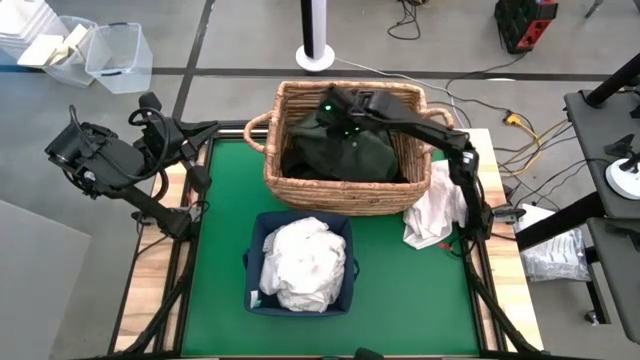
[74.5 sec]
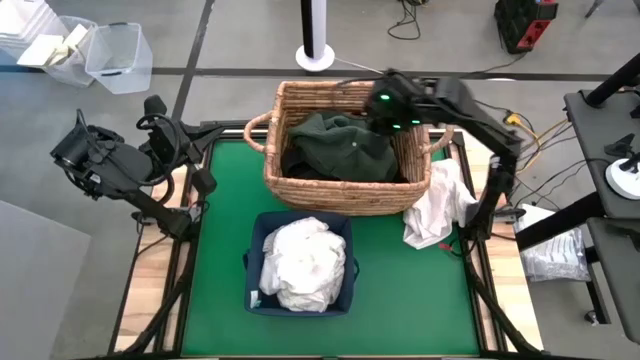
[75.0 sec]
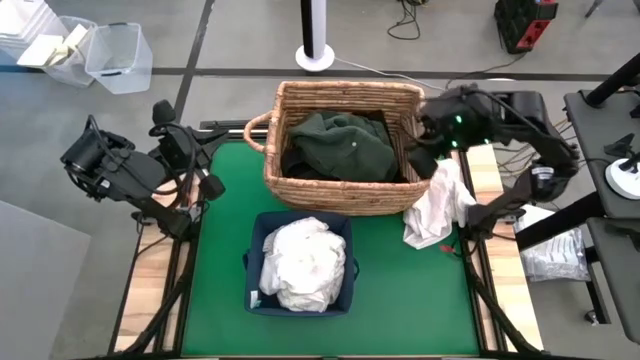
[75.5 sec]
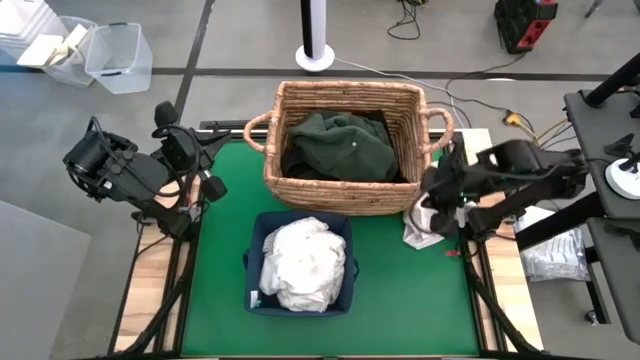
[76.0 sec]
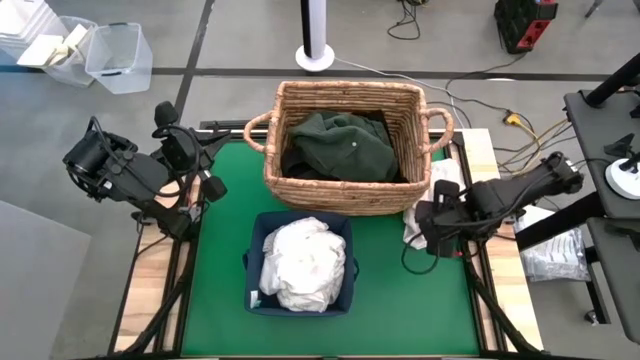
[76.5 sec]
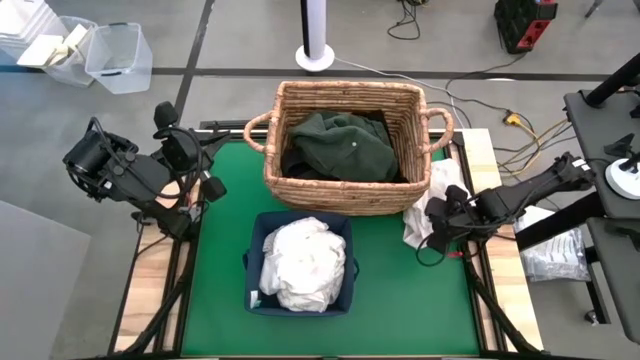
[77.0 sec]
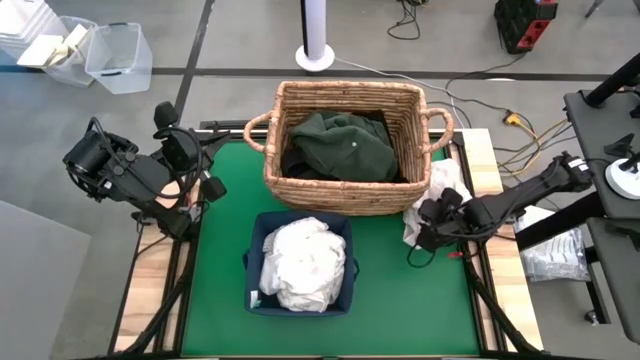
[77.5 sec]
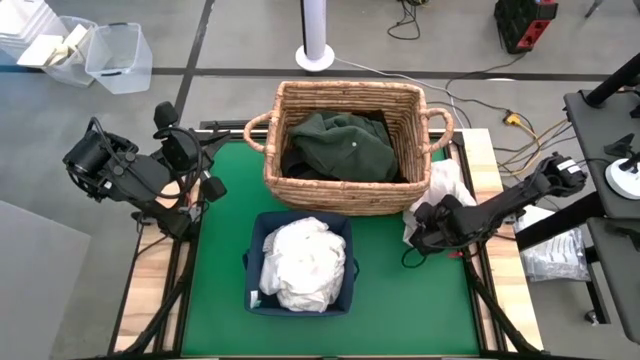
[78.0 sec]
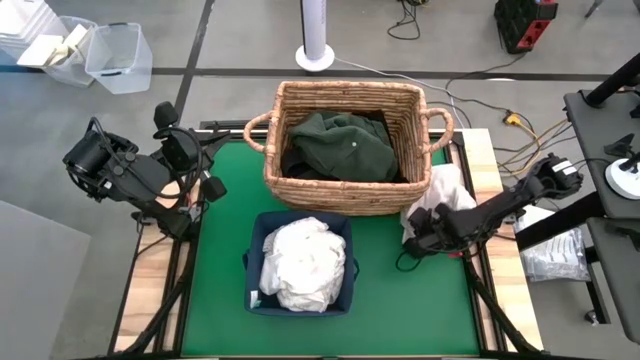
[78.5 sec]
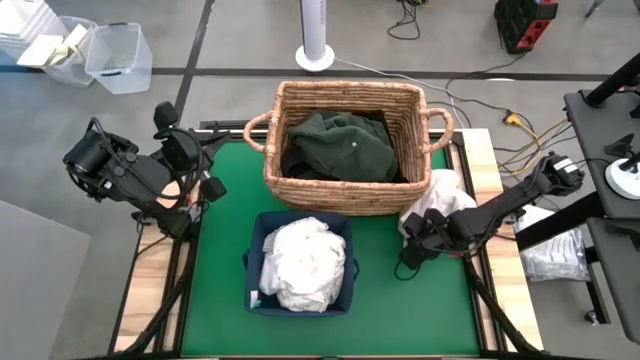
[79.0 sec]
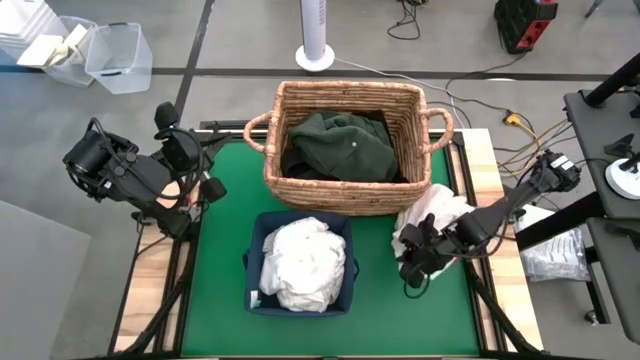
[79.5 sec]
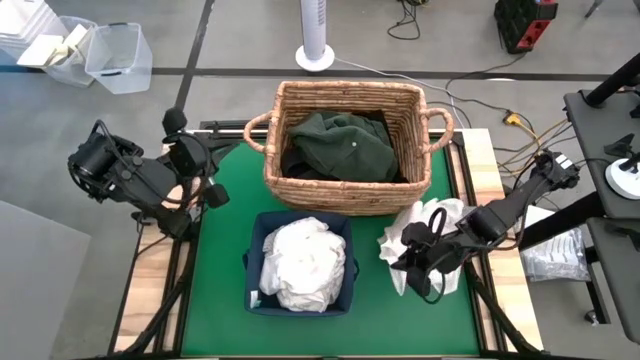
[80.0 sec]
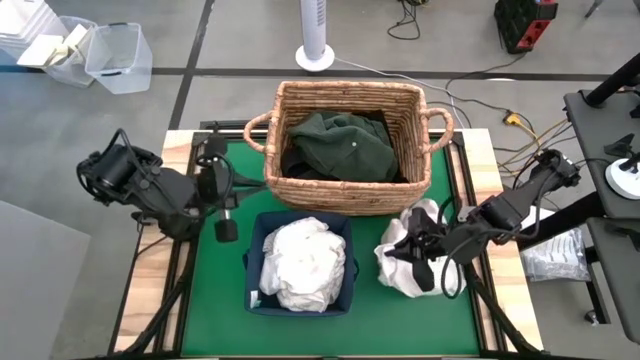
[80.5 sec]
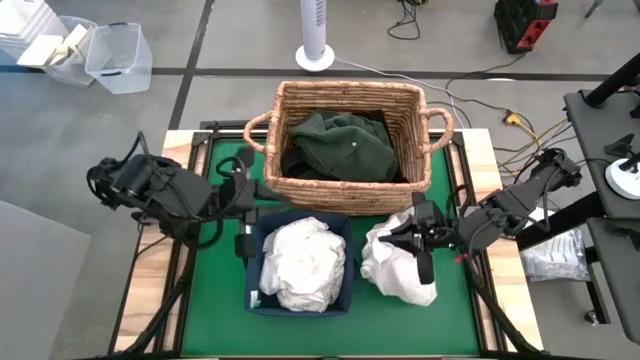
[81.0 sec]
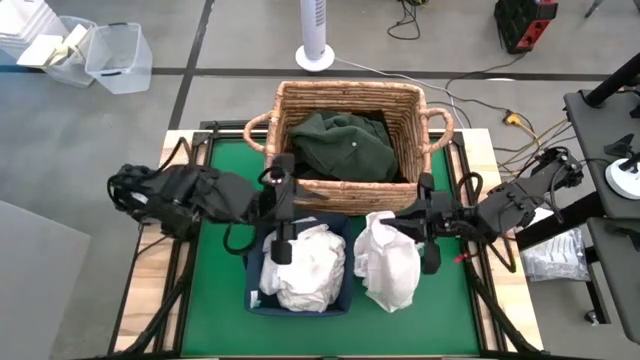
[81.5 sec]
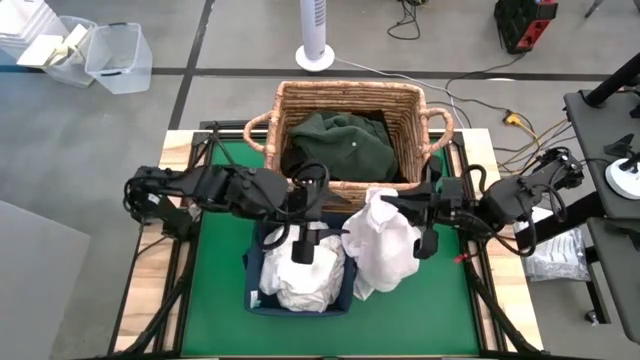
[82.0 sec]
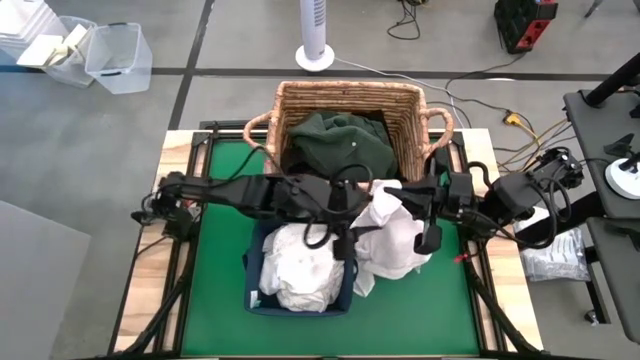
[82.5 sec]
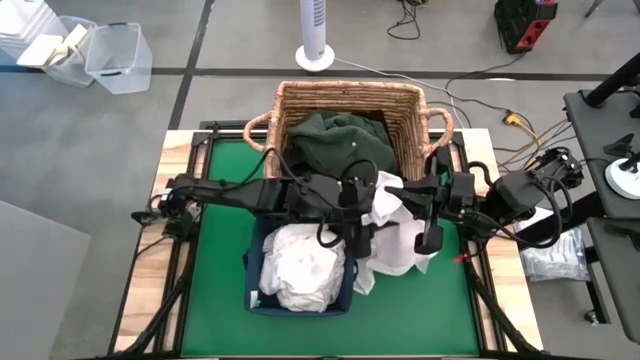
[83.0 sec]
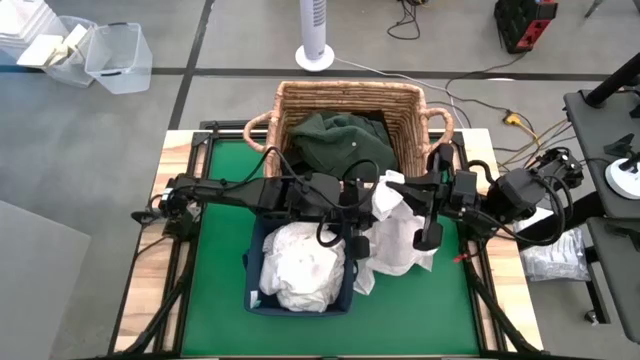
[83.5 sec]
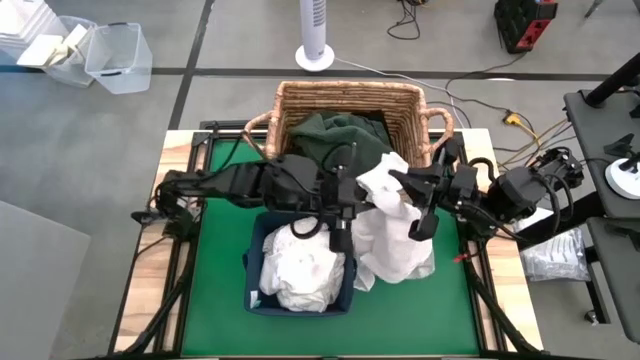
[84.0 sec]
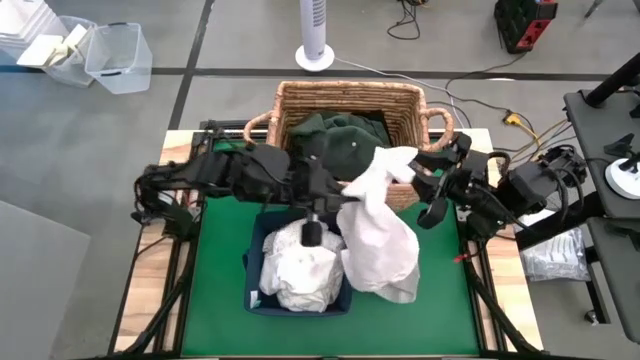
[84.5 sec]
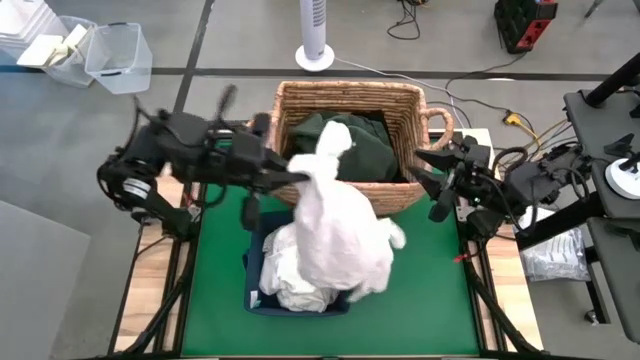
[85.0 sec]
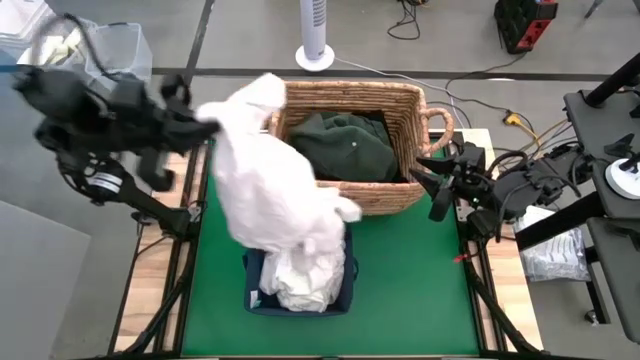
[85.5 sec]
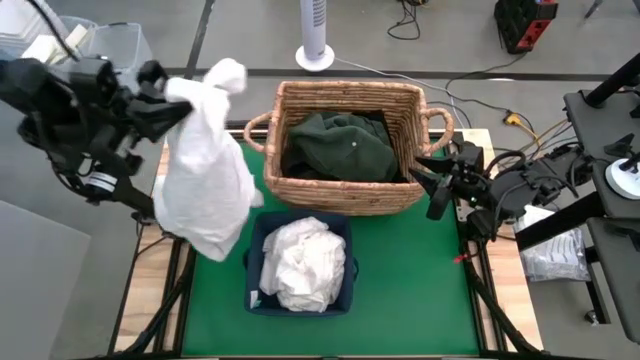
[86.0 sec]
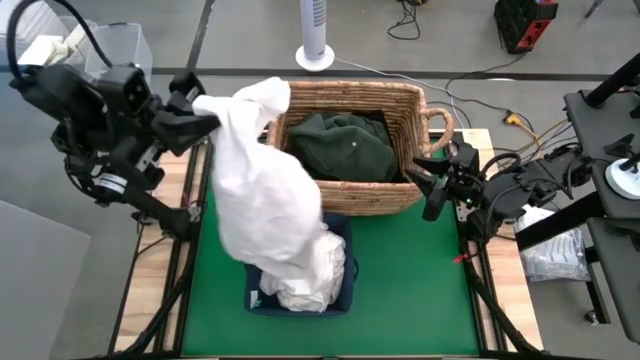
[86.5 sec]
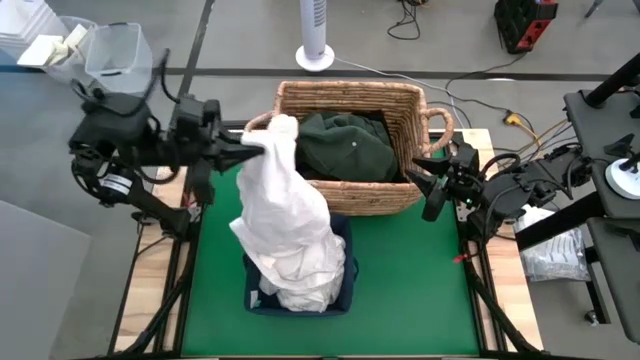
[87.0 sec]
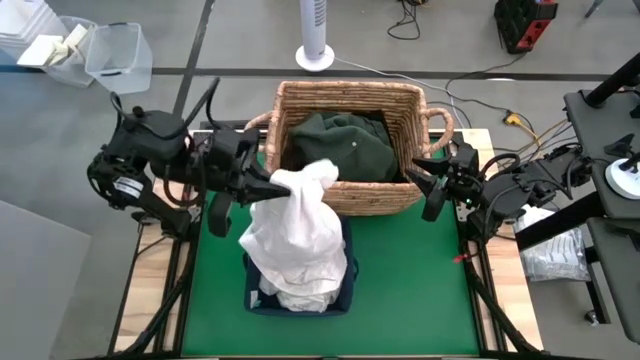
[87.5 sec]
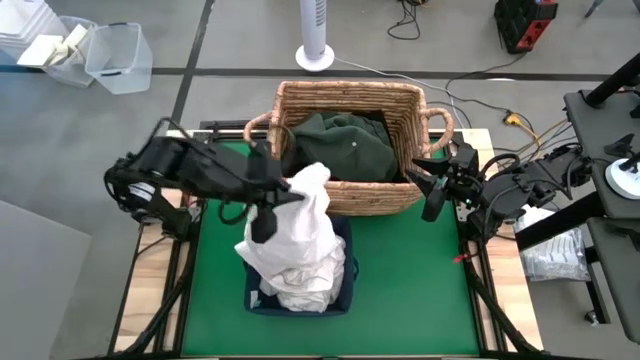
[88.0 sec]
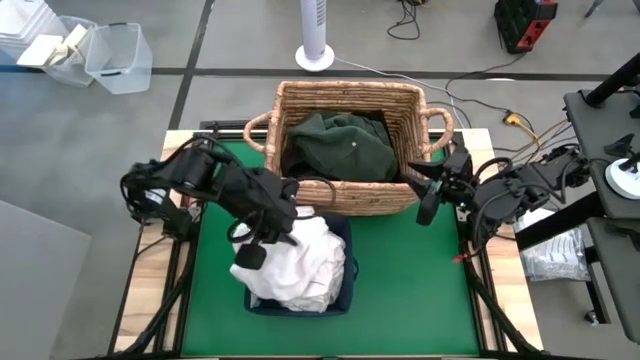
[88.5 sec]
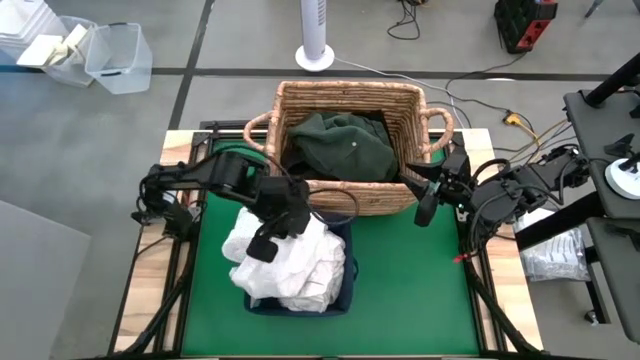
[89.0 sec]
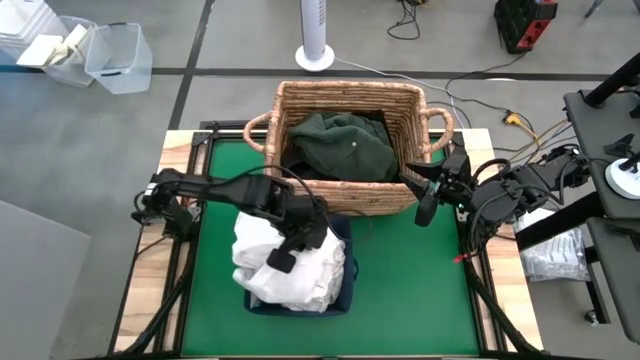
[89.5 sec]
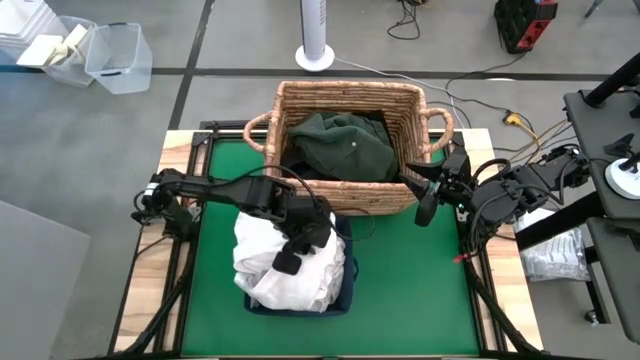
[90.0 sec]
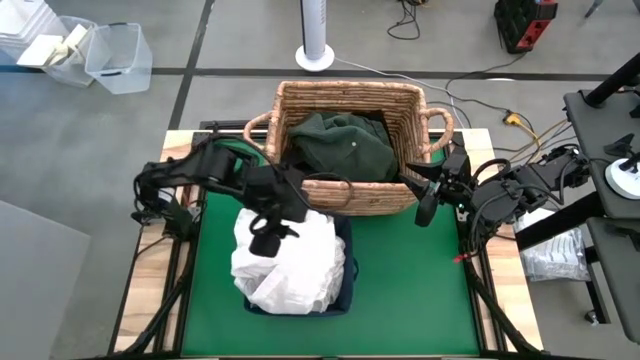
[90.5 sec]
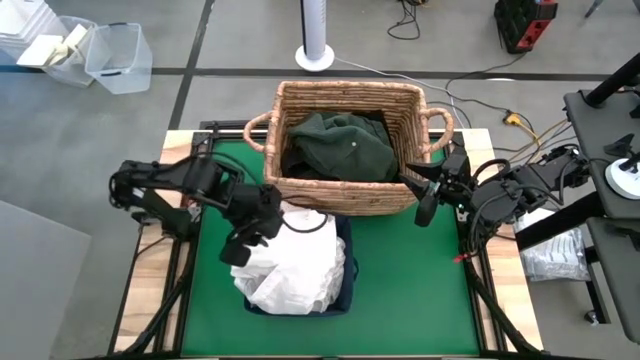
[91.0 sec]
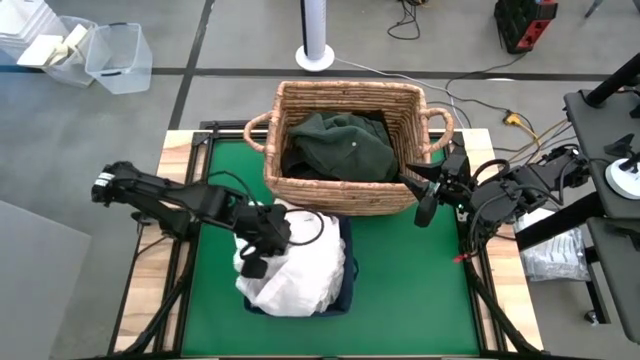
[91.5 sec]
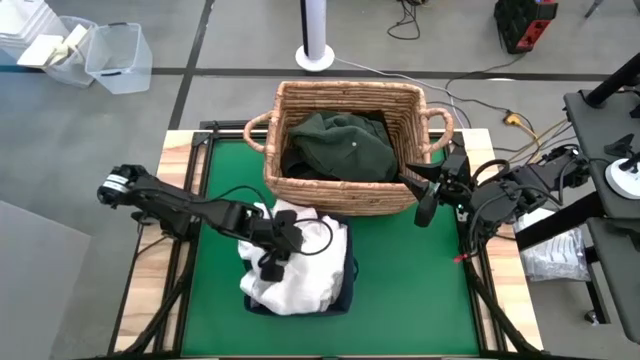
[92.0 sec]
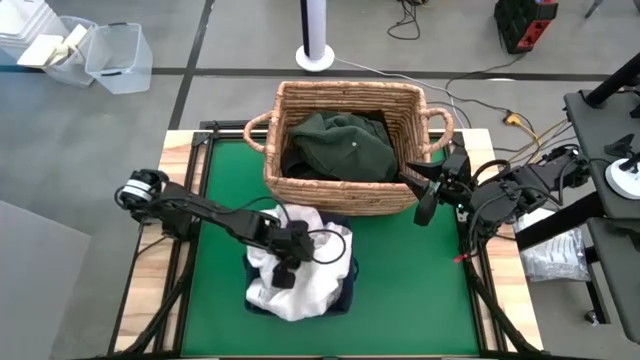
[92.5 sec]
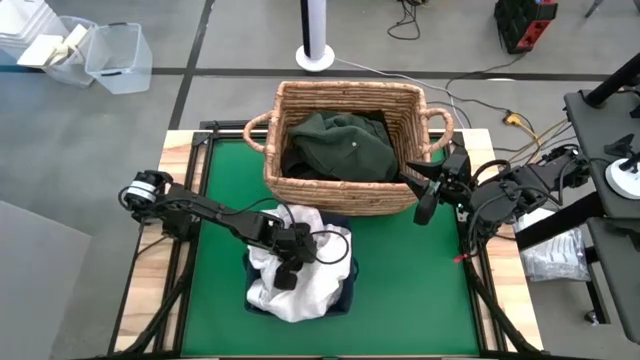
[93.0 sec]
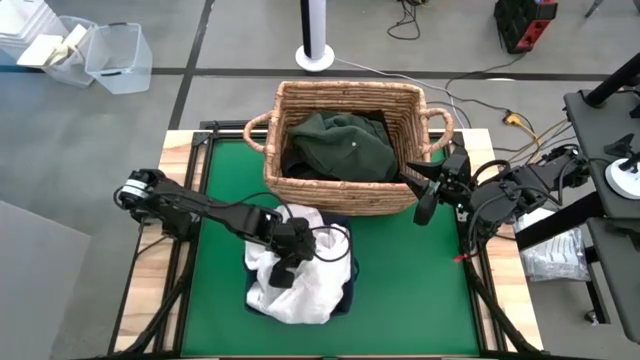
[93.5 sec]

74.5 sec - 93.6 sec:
Put the white shirt into the blue laundry organizer
